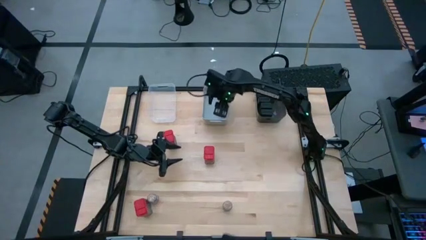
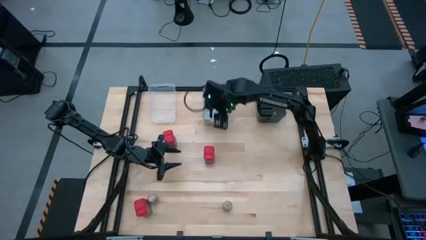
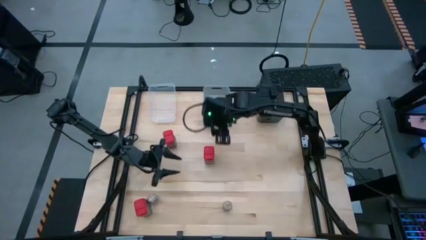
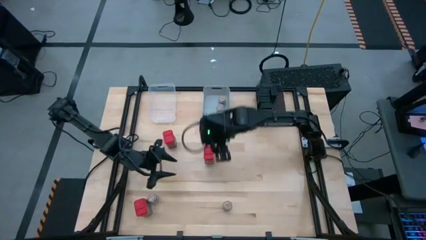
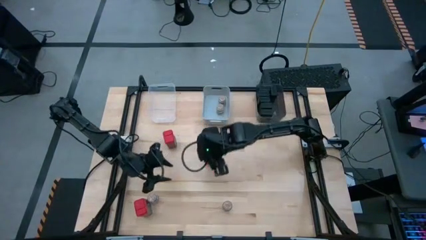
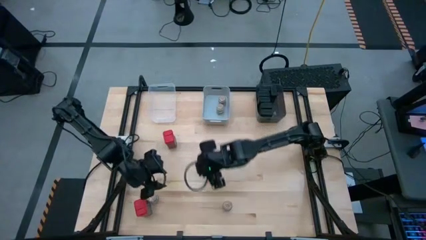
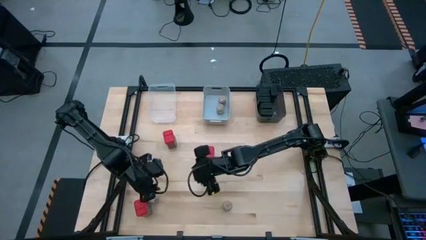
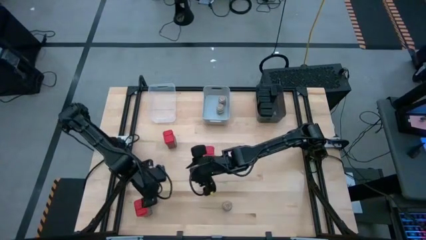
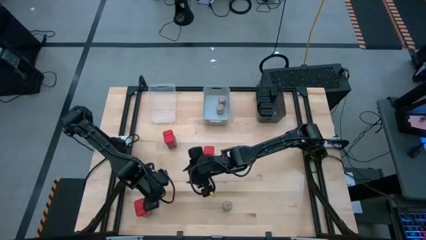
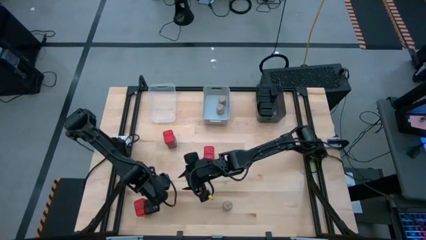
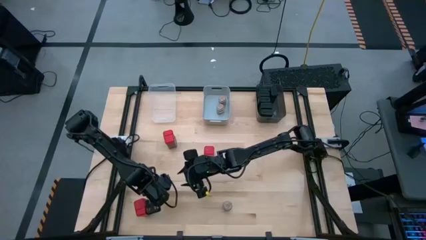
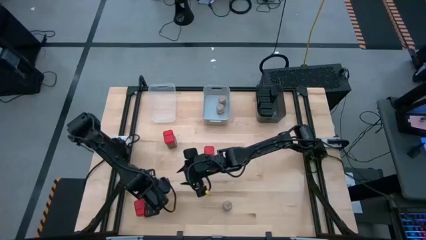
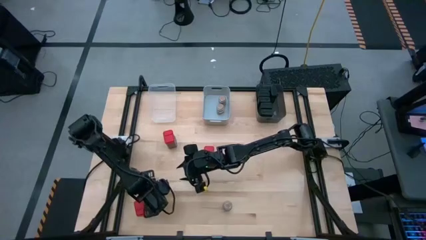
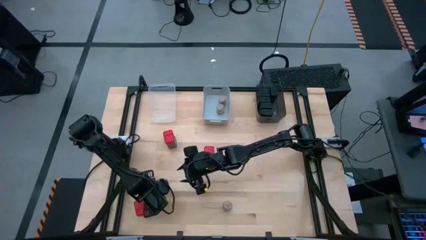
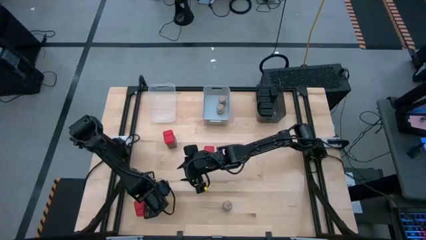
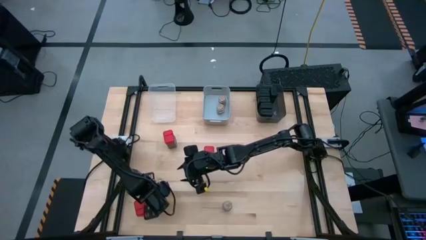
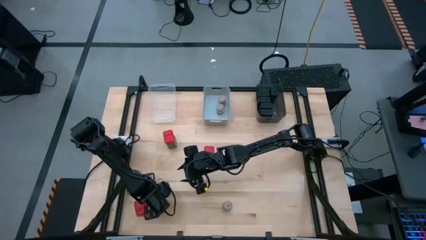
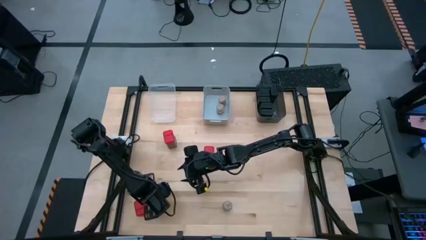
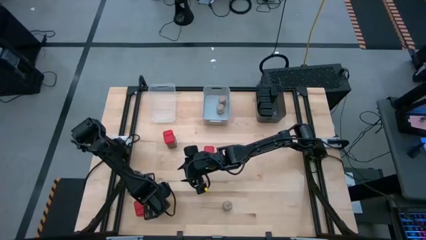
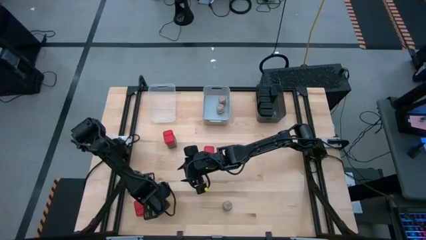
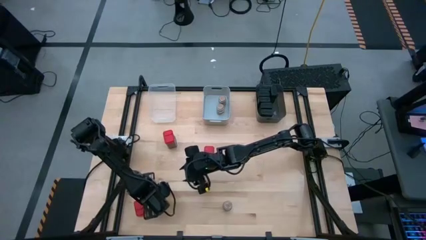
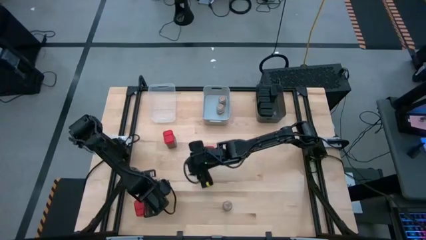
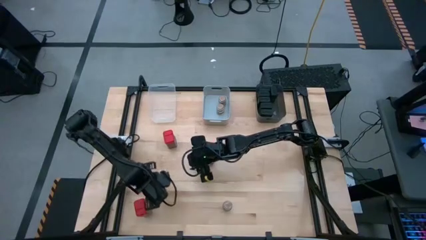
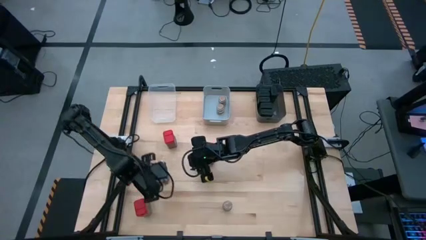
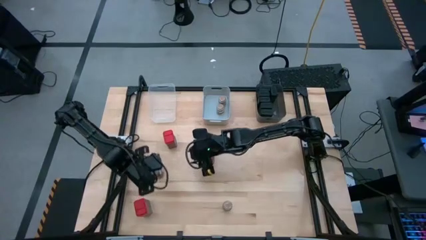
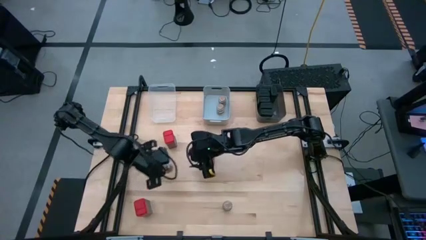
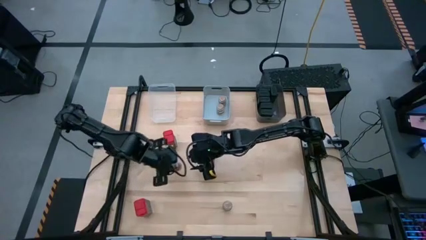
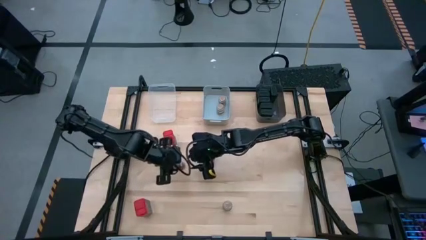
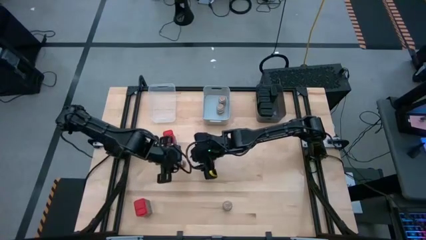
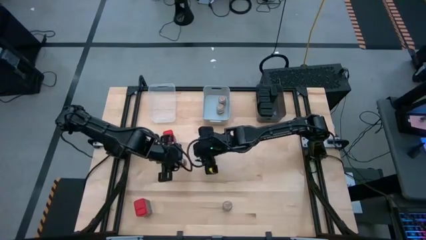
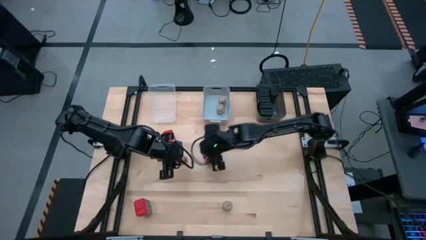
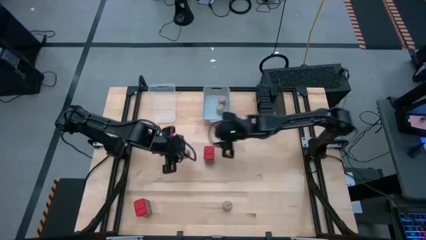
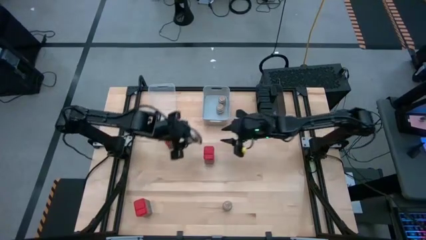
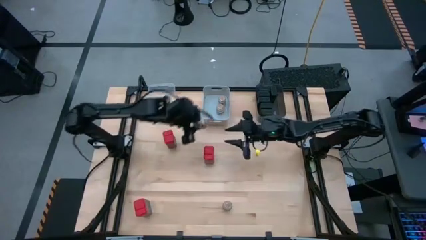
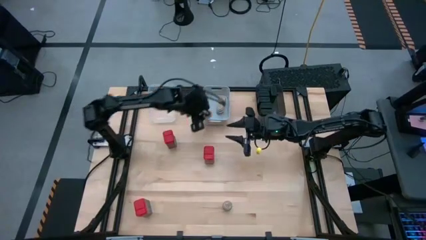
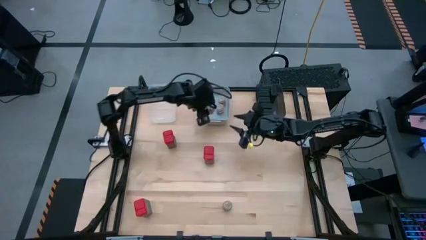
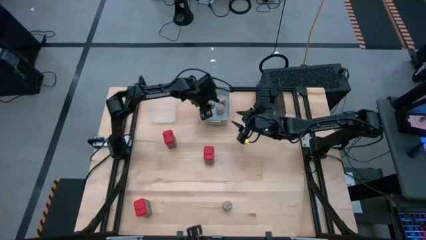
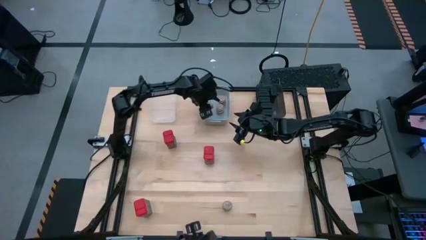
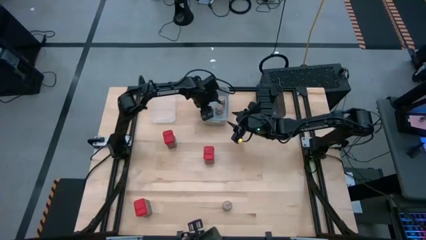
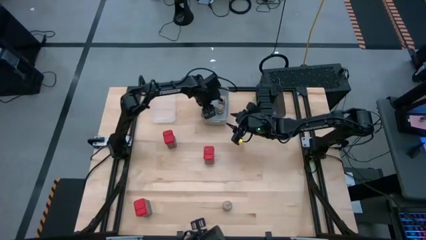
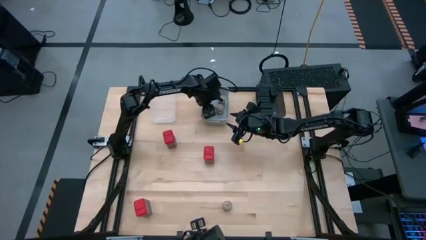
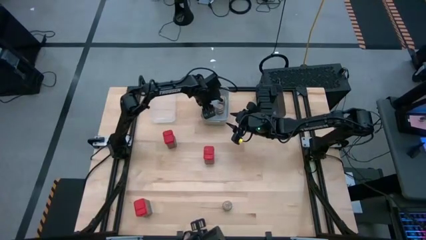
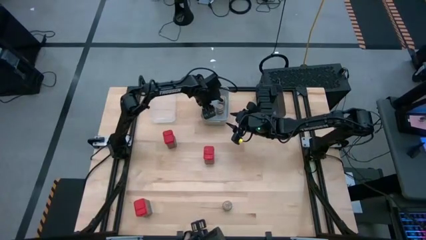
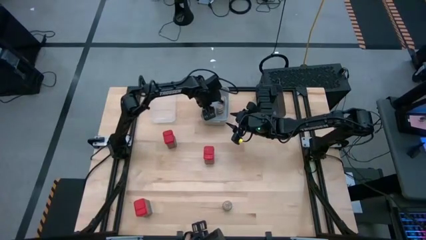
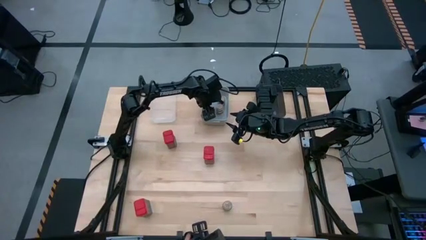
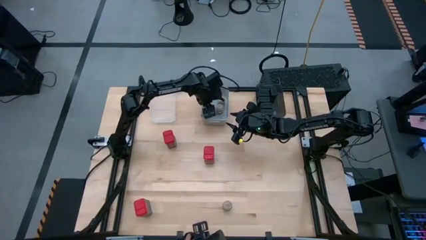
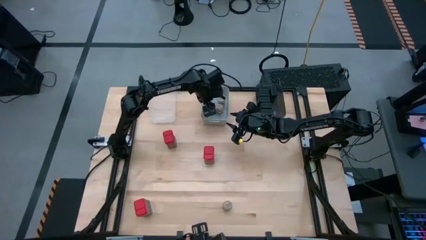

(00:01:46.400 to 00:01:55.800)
Task: Sort spices by type
Put the bottom left brown seasoning bottle into the light gray bin

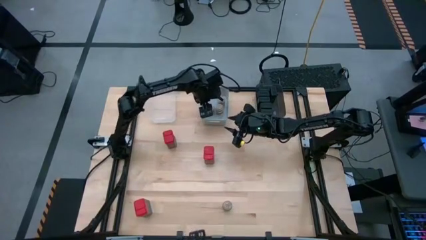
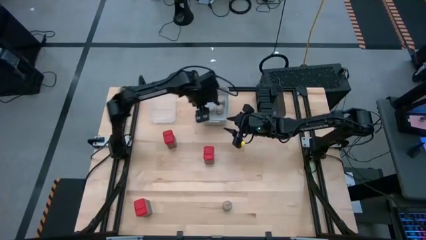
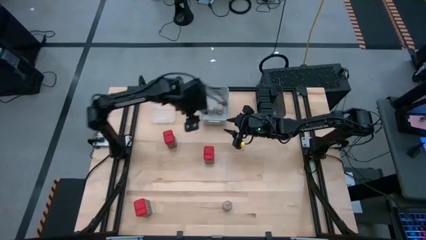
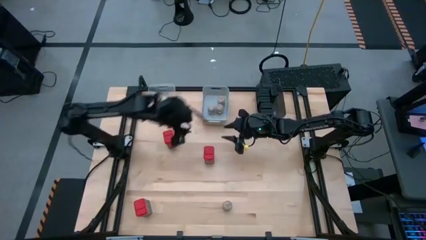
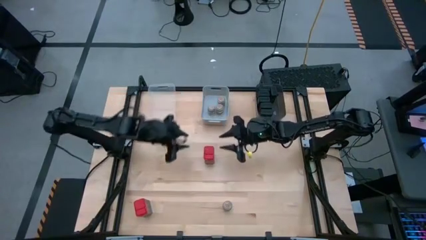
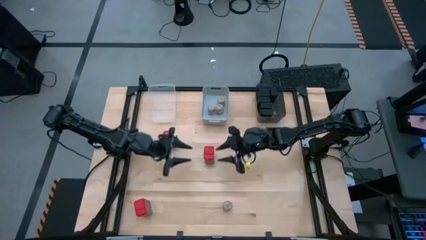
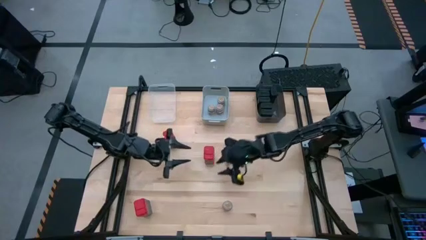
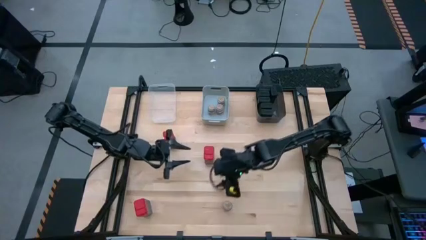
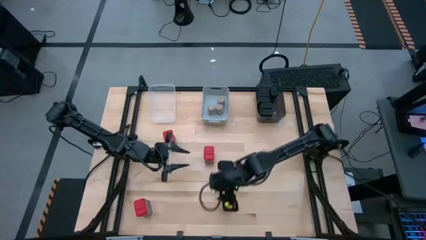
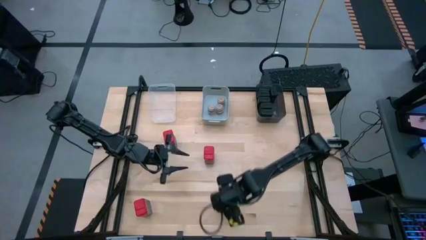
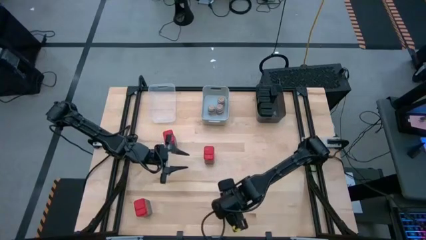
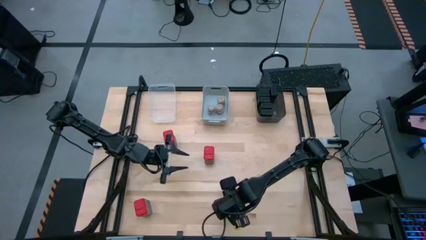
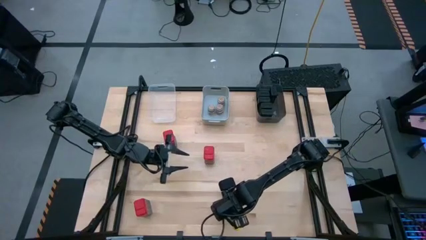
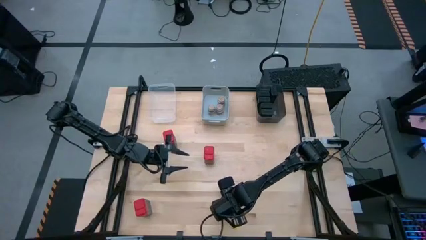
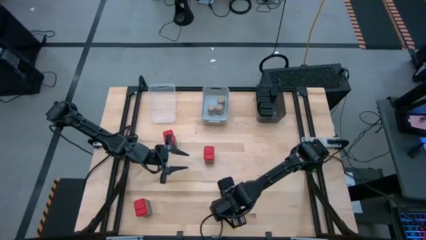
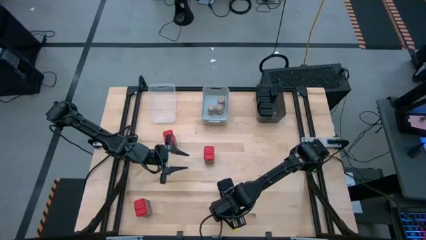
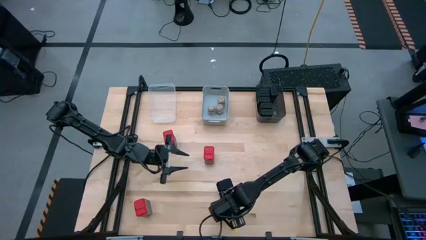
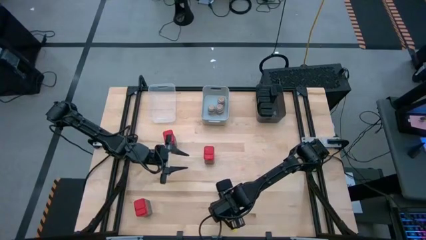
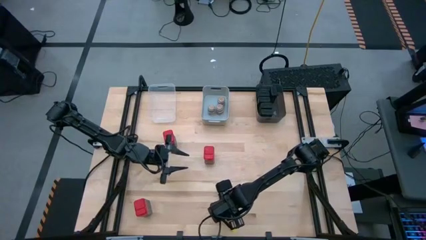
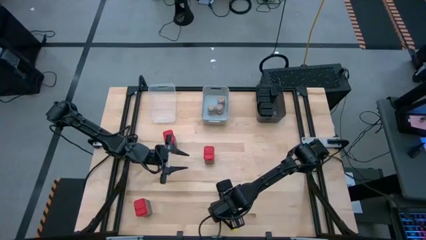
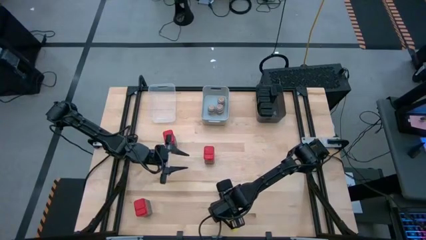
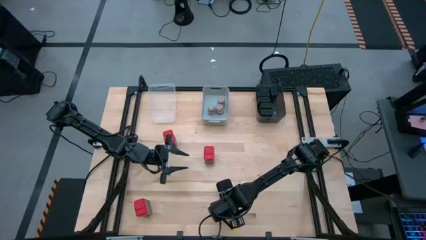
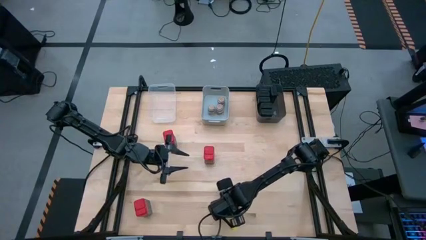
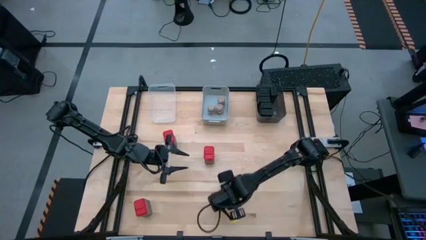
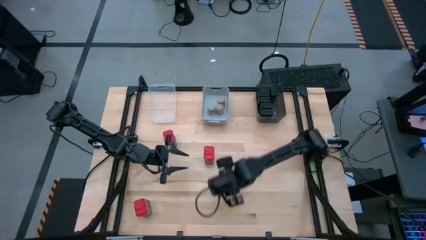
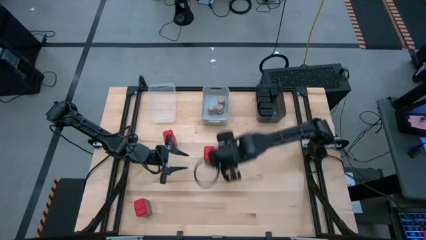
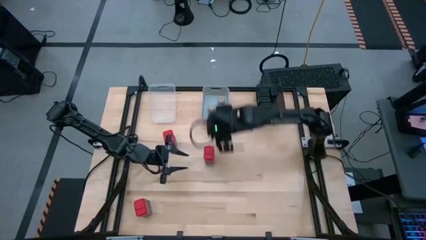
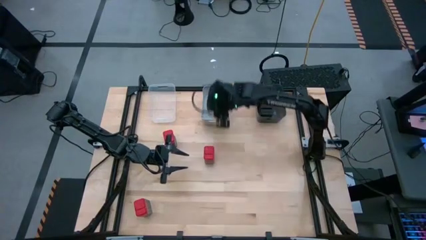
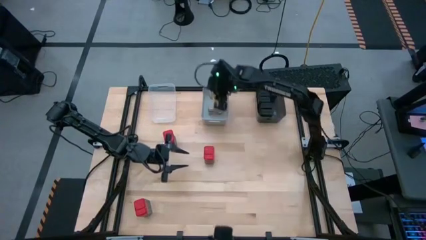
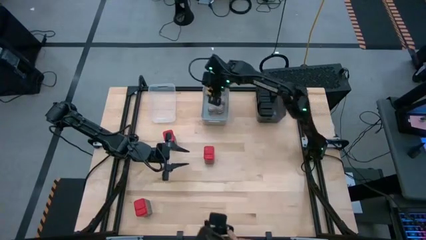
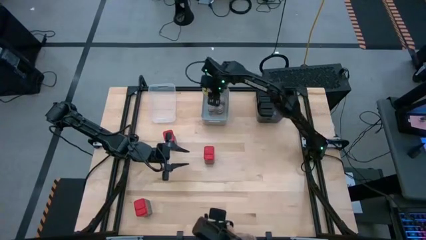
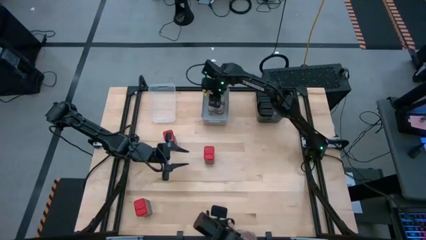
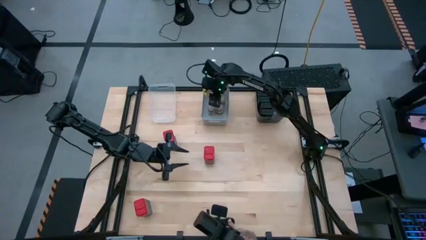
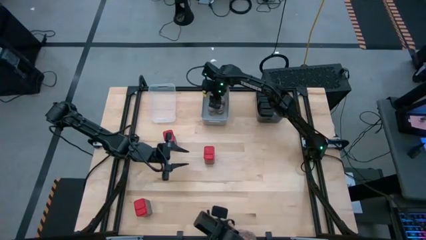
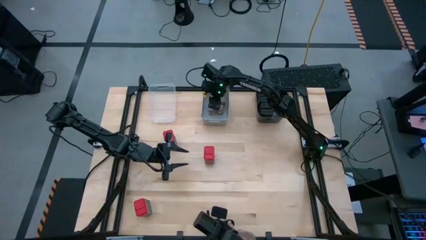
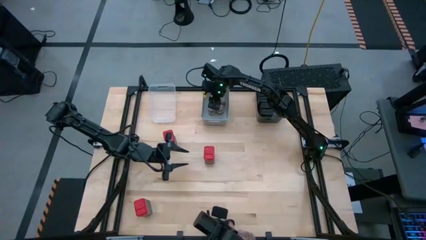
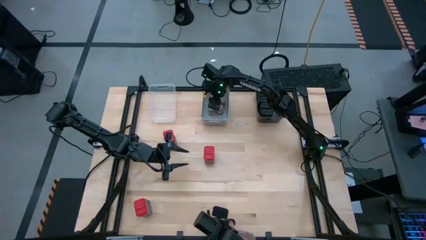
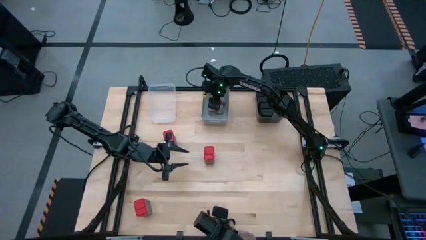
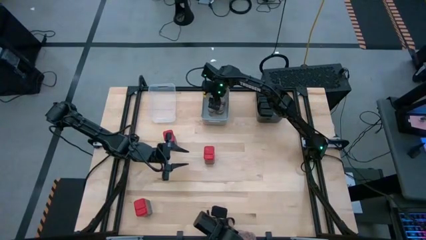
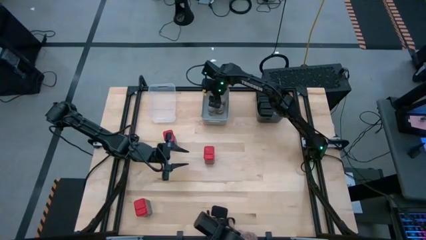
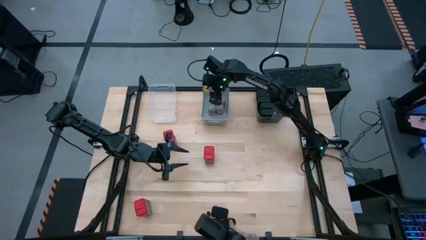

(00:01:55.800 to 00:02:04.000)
Put the brown seasoning bottle into the light gray bin
